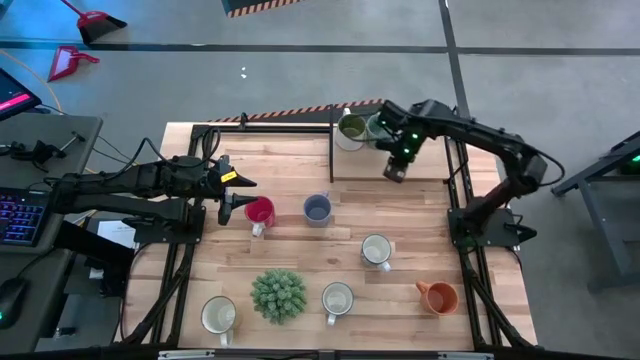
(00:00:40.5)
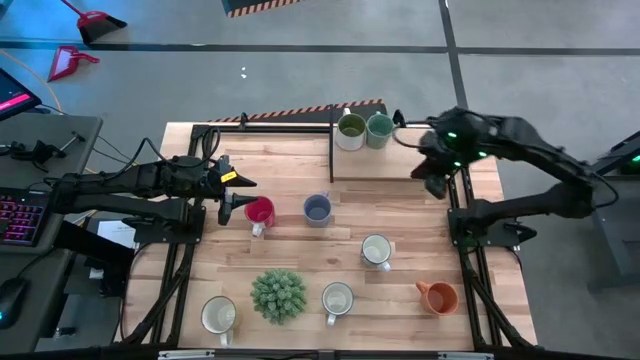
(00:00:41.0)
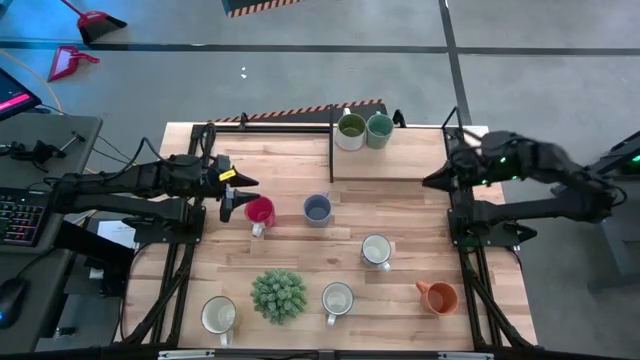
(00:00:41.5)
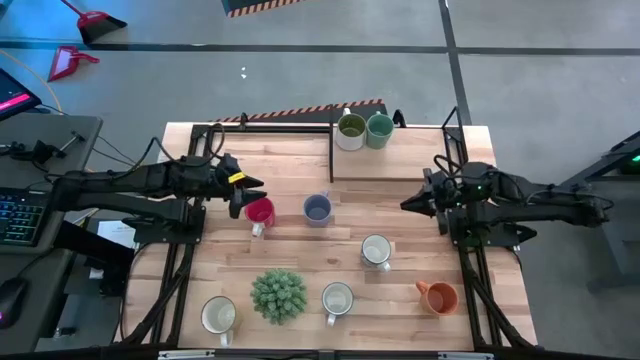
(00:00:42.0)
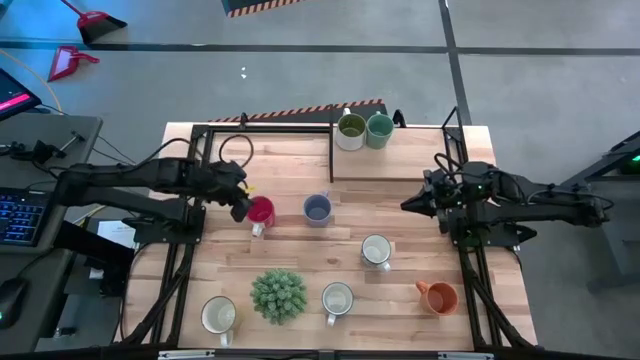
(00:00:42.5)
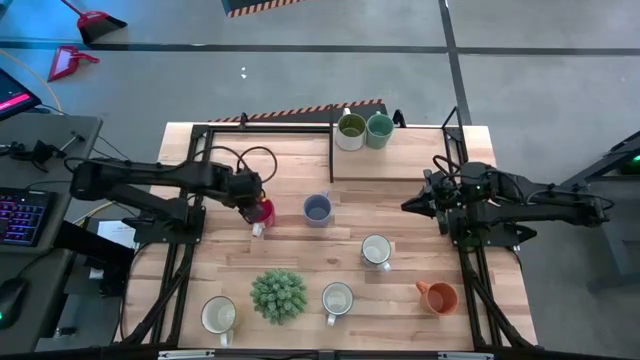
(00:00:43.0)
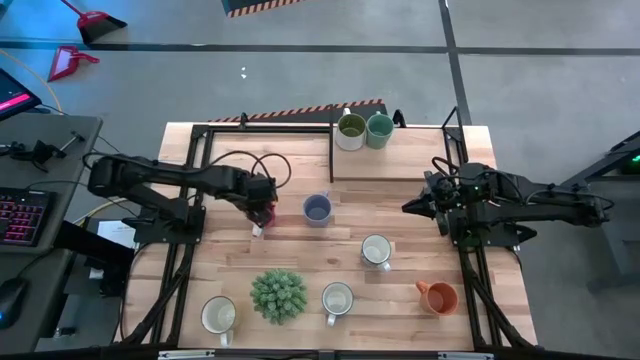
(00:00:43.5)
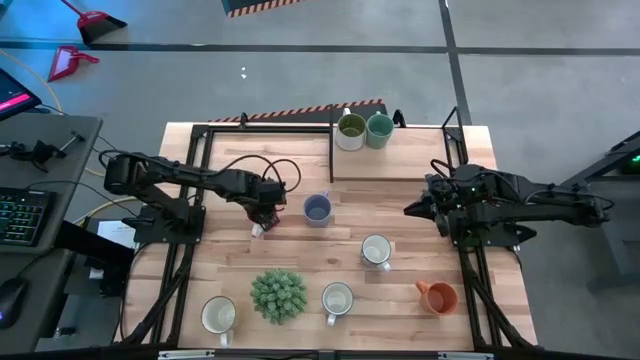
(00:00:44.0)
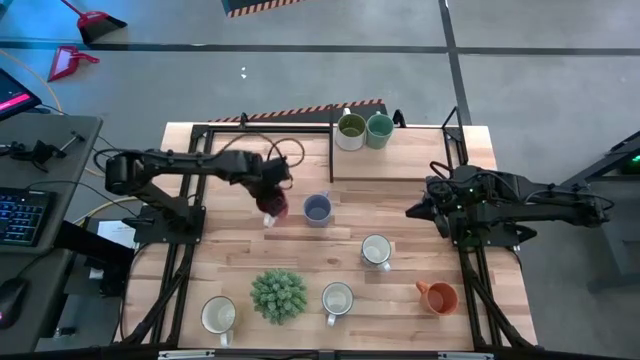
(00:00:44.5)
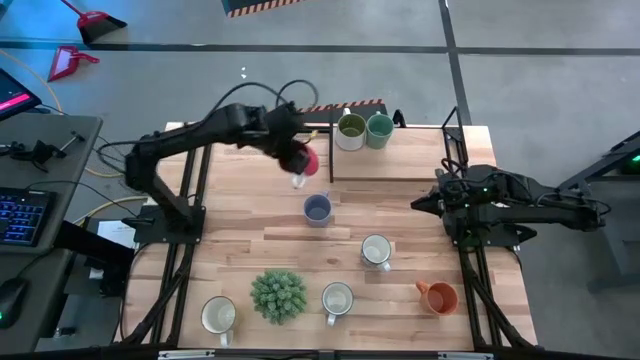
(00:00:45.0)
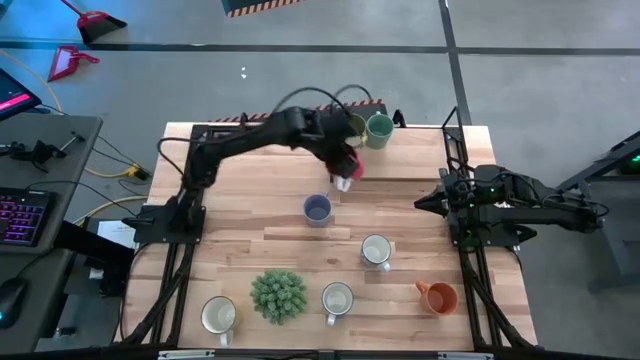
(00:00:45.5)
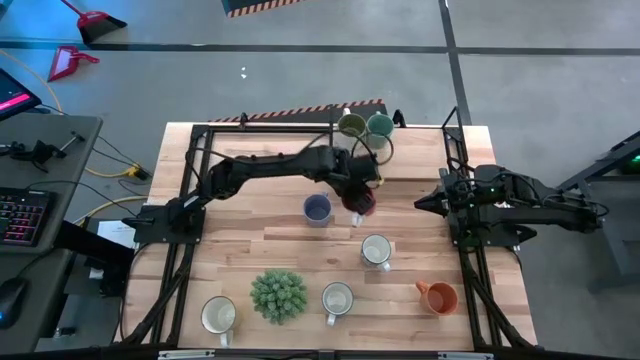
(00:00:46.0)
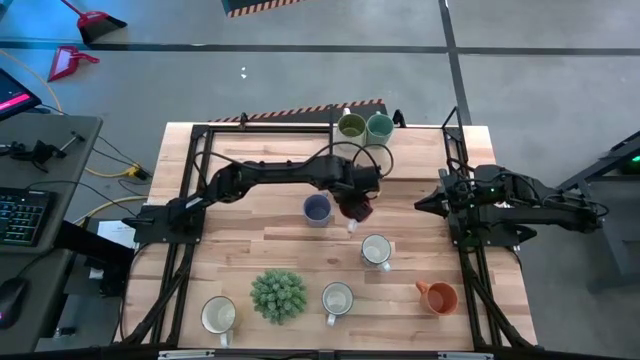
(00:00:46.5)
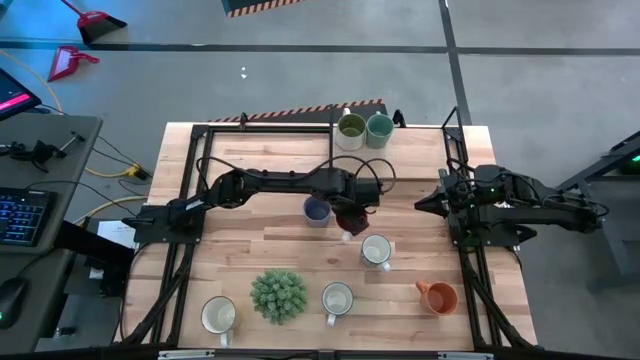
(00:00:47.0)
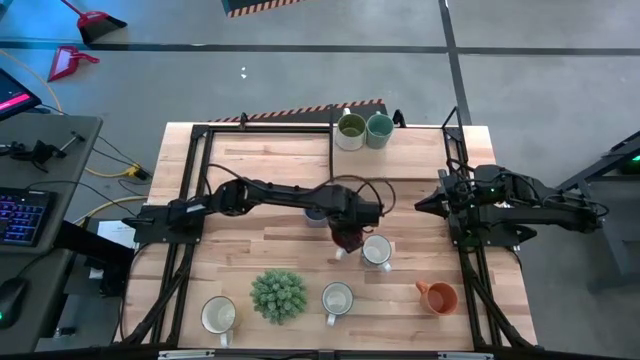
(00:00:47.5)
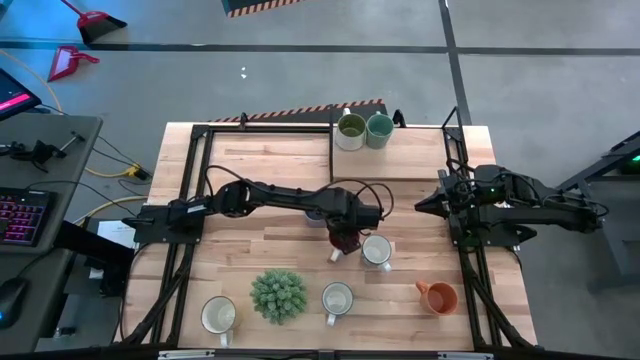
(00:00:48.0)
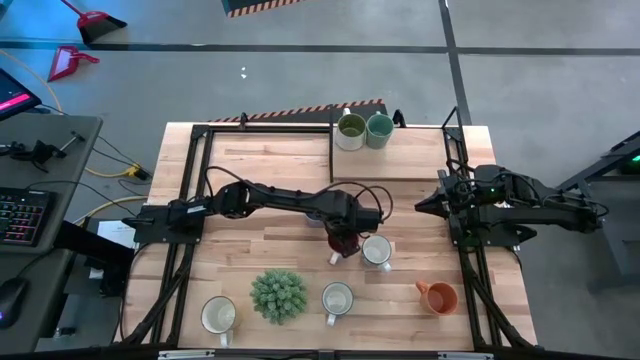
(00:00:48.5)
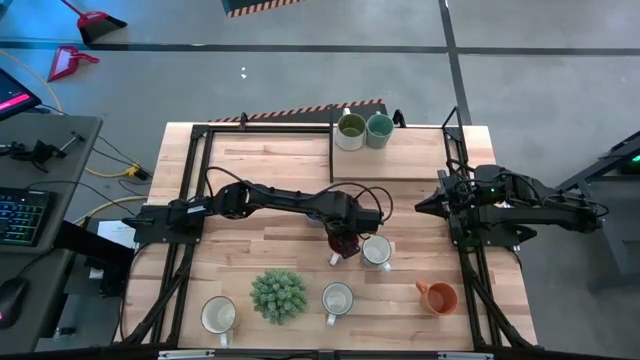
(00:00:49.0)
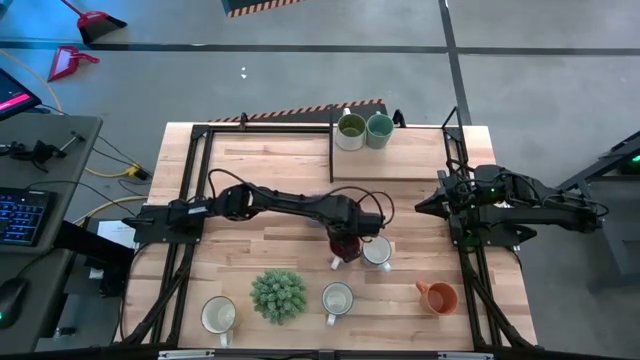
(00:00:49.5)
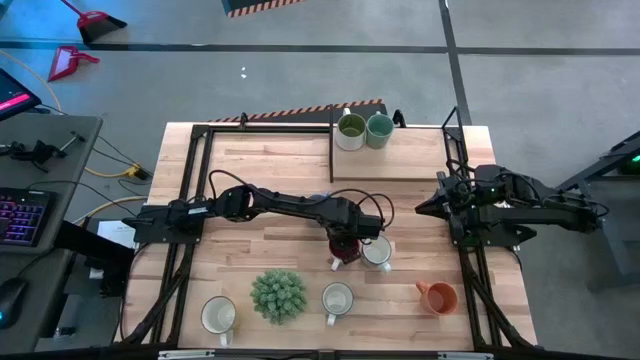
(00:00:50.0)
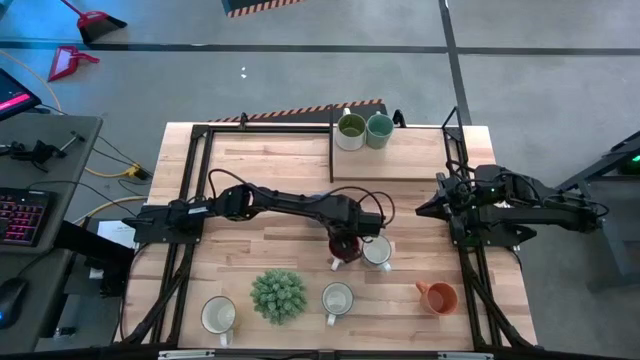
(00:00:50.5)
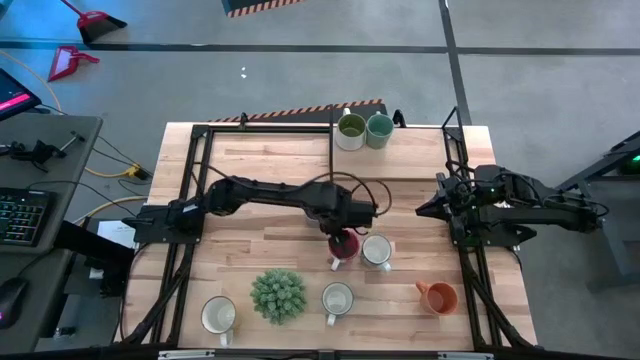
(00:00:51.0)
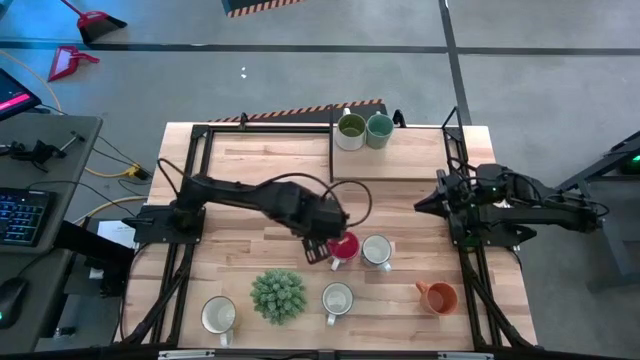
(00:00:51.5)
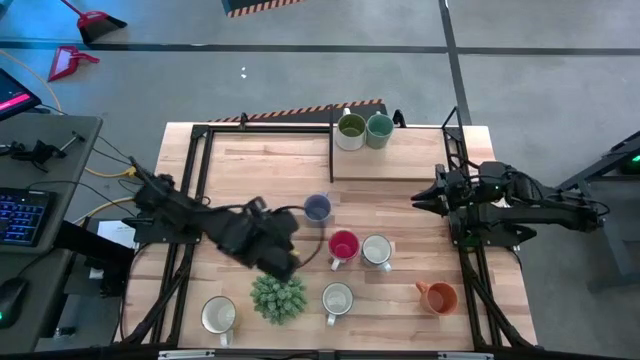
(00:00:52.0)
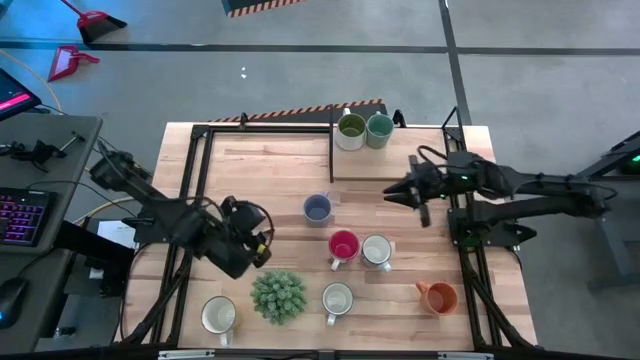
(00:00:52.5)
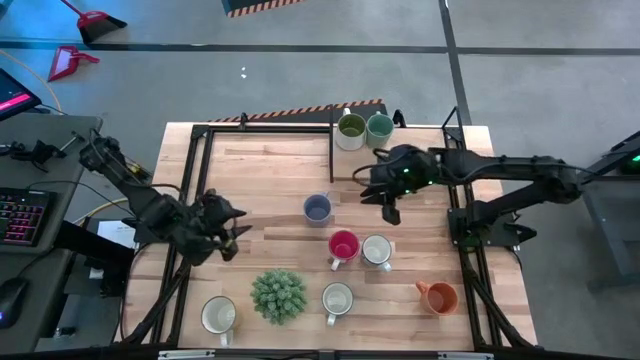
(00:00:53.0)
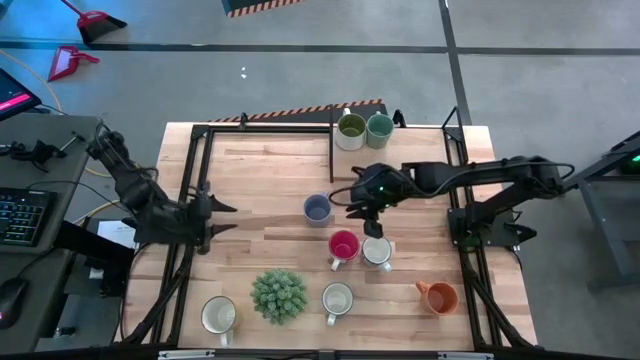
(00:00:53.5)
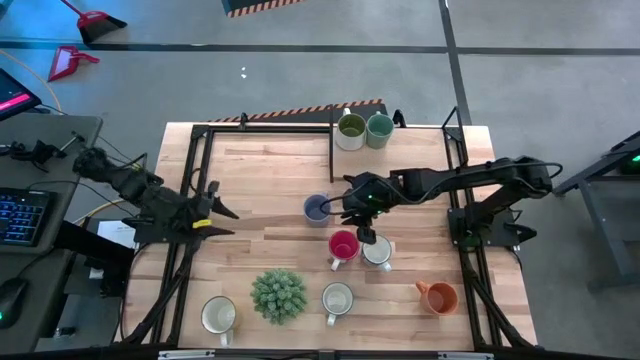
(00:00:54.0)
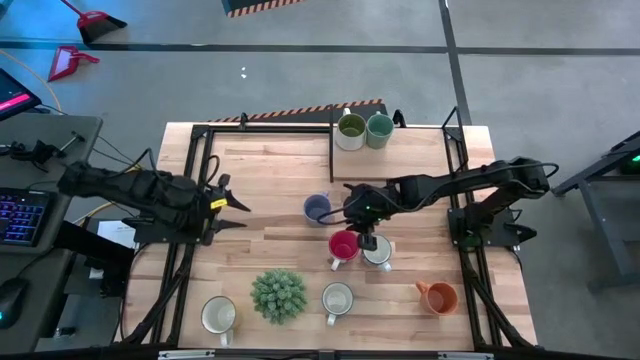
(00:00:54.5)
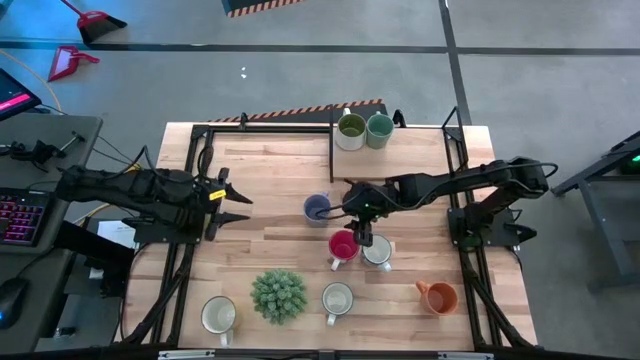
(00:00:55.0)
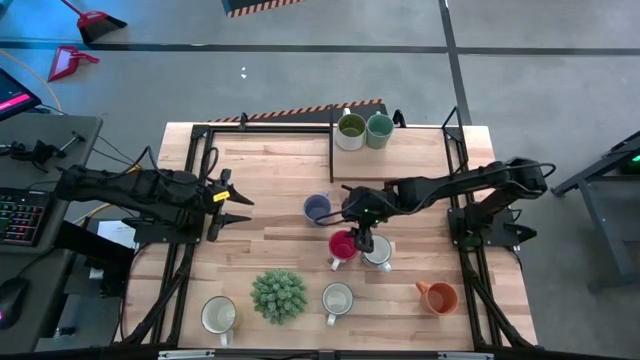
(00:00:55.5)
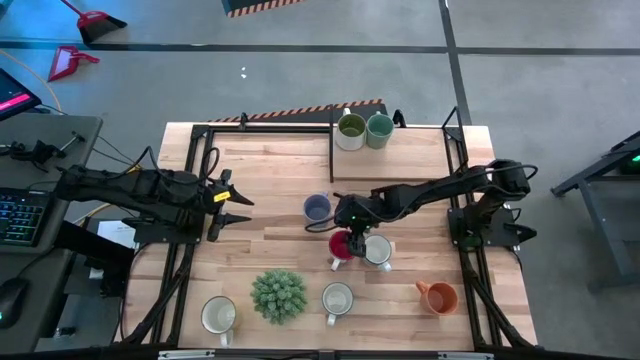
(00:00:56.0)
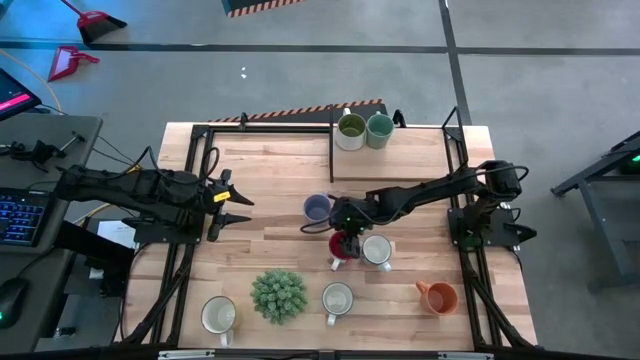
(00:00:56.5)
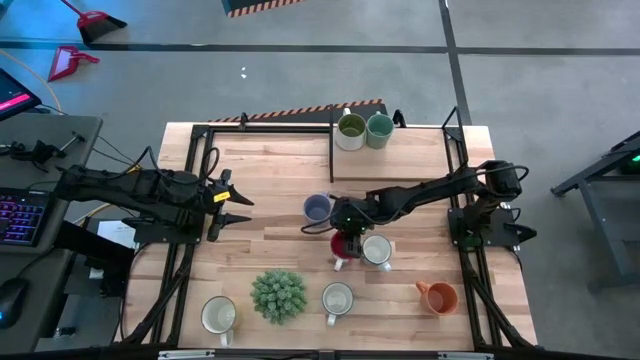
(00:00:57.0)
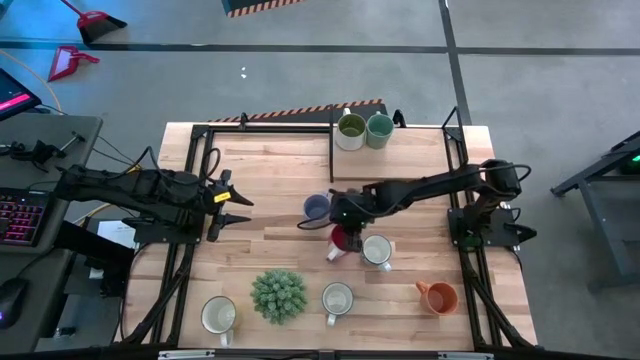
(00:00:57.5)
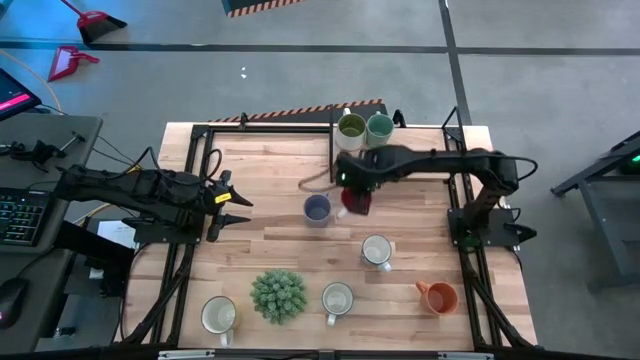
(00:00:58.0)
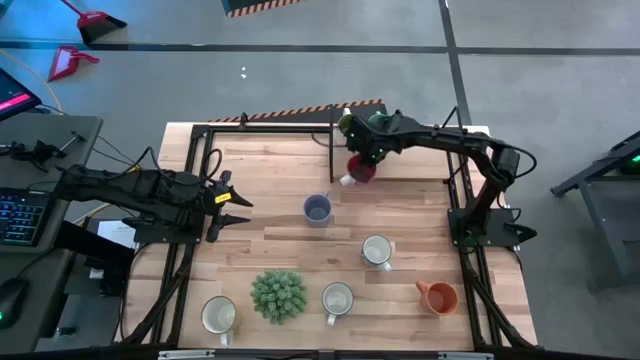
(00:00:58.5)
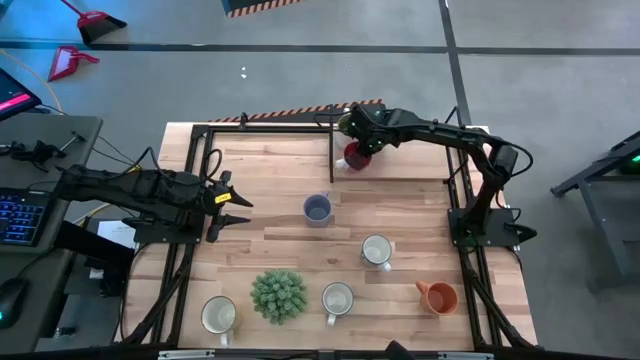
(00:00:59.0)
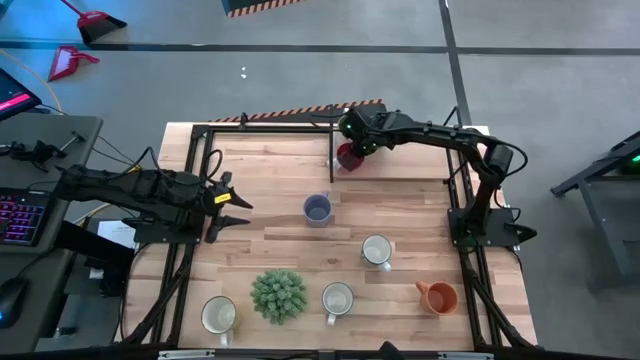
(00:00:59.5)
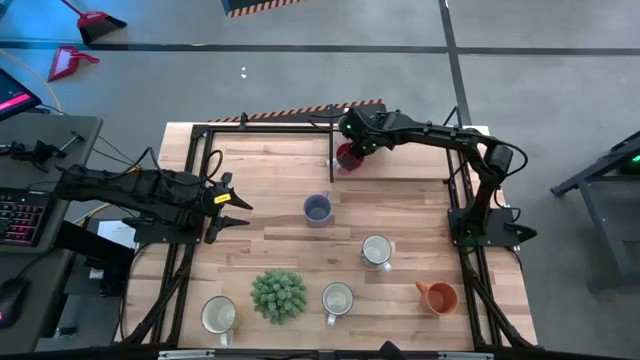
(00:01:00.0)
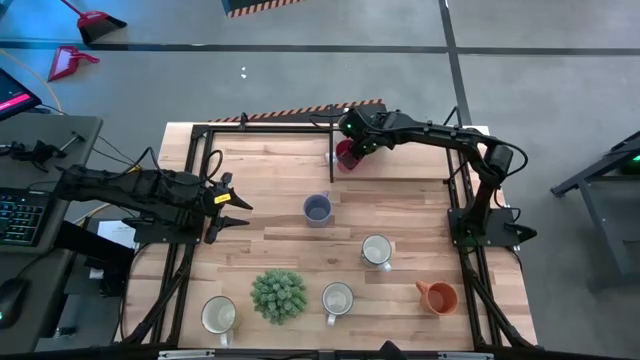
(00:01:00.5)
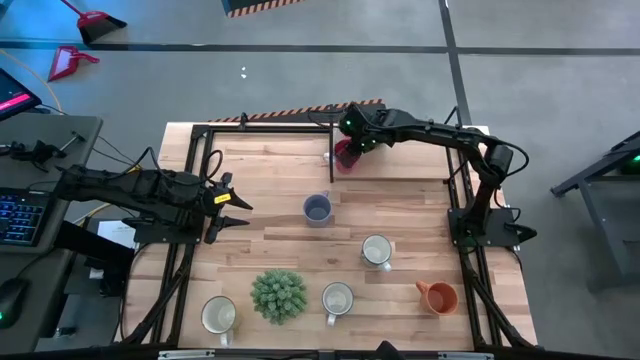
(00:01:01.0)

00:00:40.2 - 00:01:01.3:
Task: Place coffee mugs
Put the red mug on the shelf
